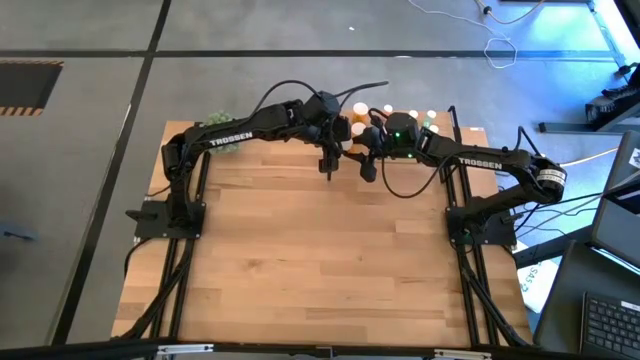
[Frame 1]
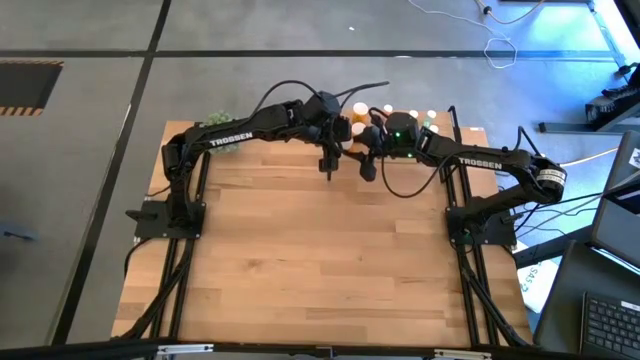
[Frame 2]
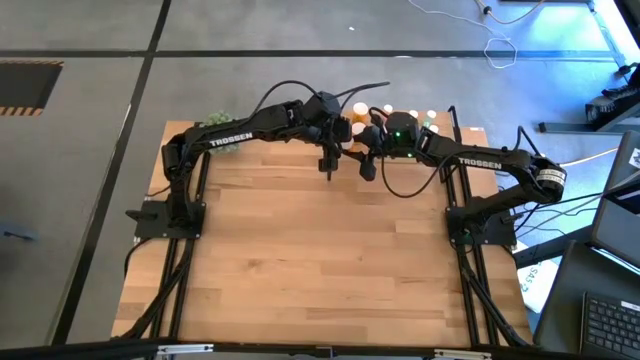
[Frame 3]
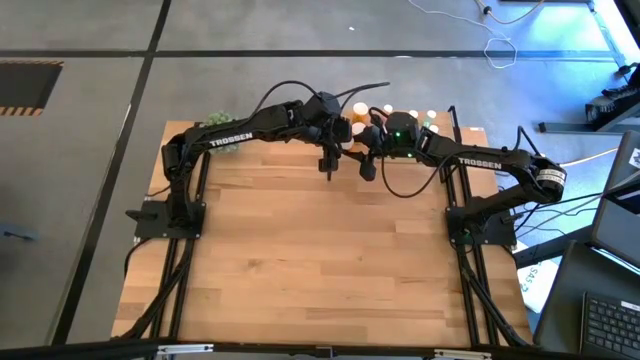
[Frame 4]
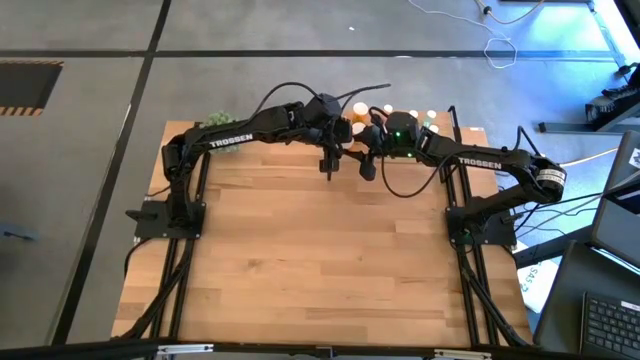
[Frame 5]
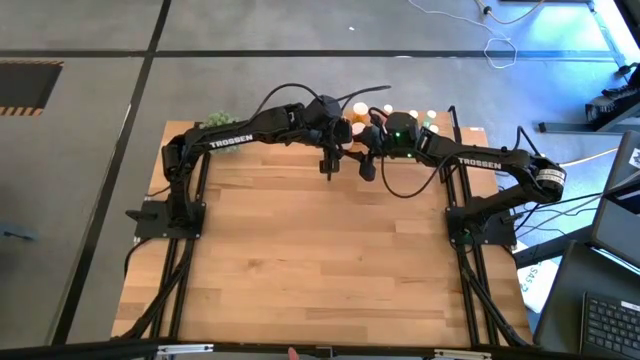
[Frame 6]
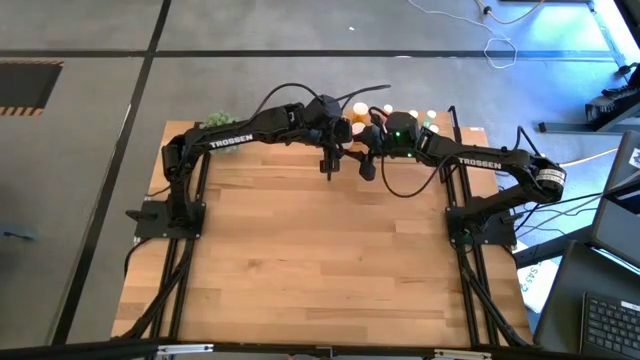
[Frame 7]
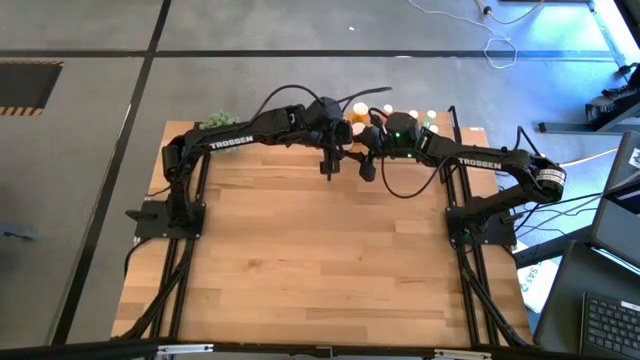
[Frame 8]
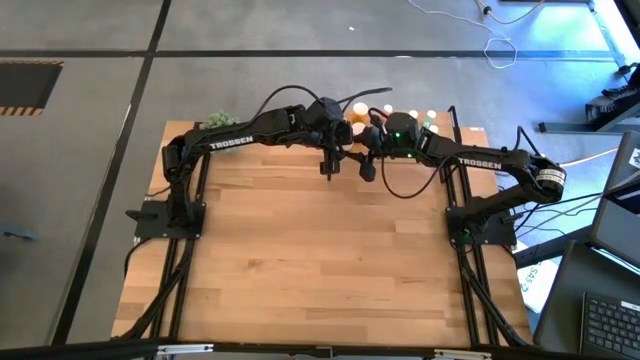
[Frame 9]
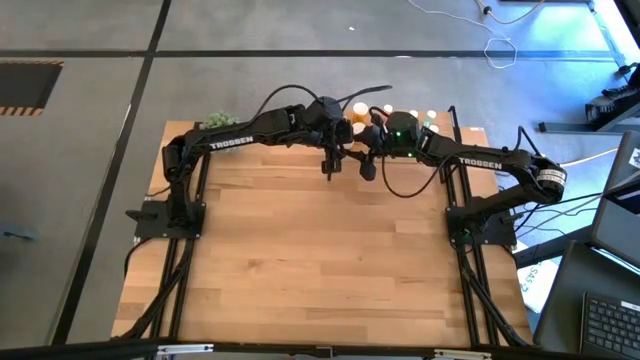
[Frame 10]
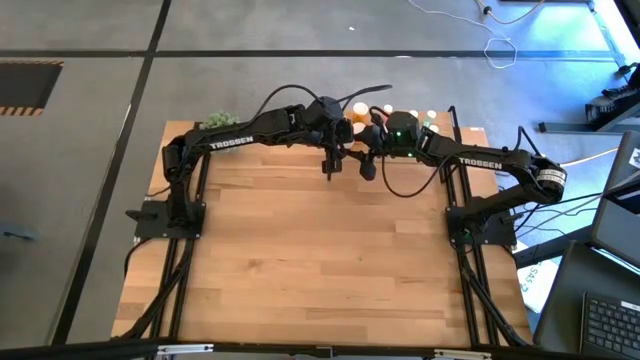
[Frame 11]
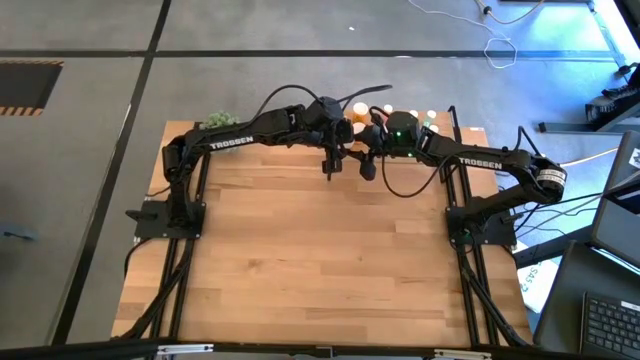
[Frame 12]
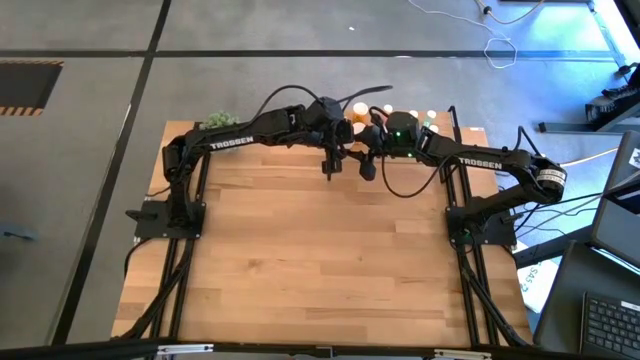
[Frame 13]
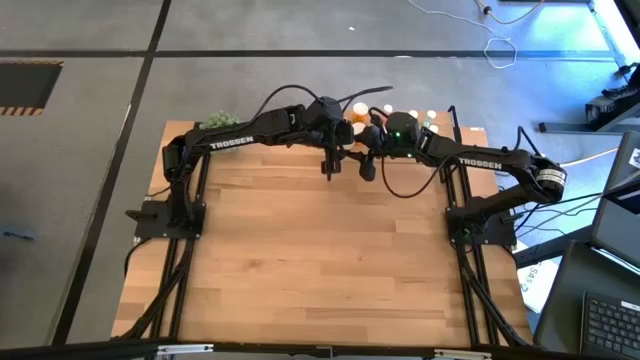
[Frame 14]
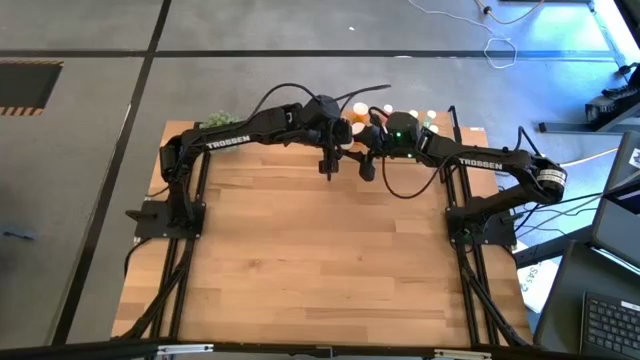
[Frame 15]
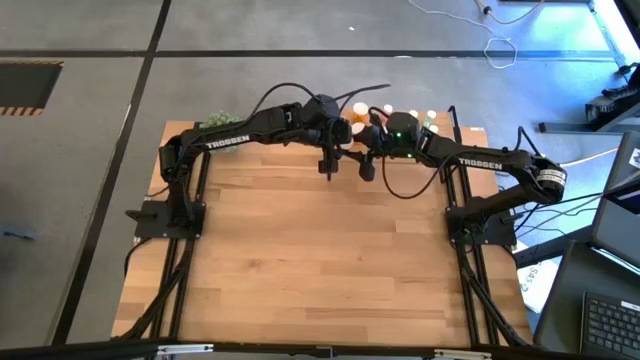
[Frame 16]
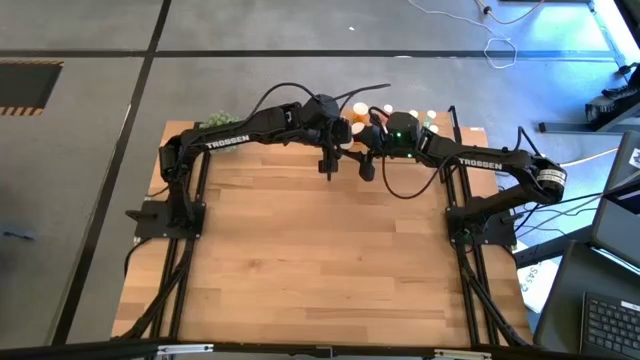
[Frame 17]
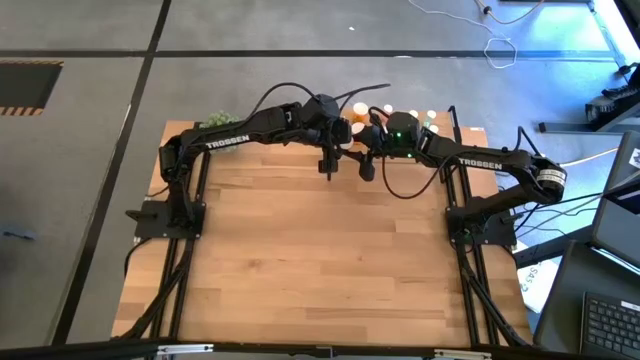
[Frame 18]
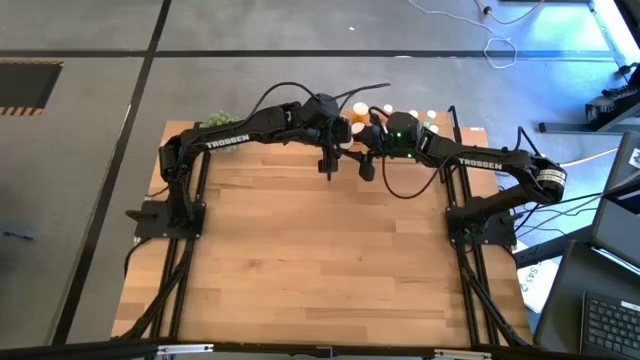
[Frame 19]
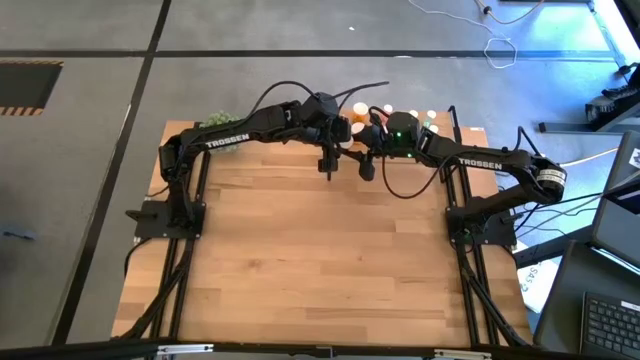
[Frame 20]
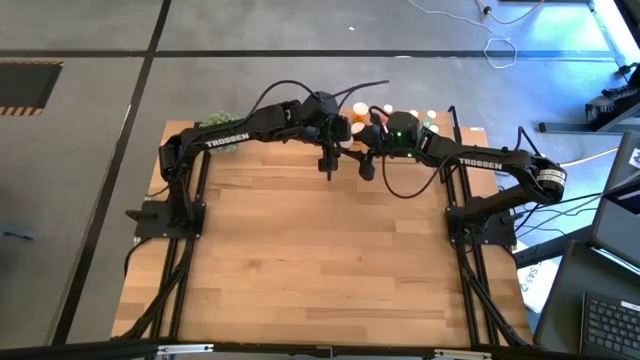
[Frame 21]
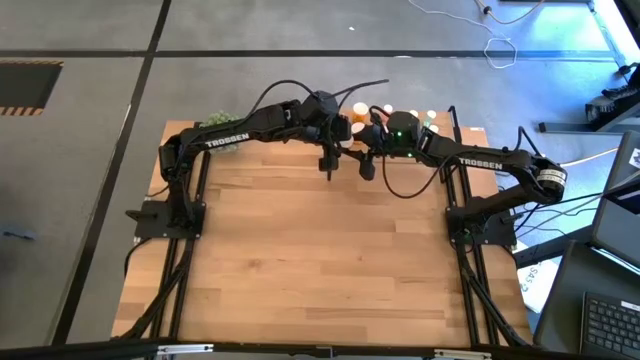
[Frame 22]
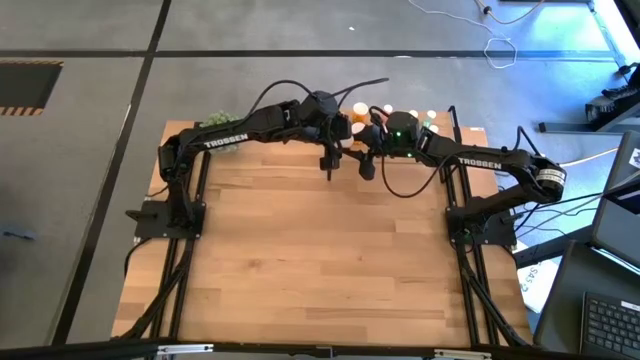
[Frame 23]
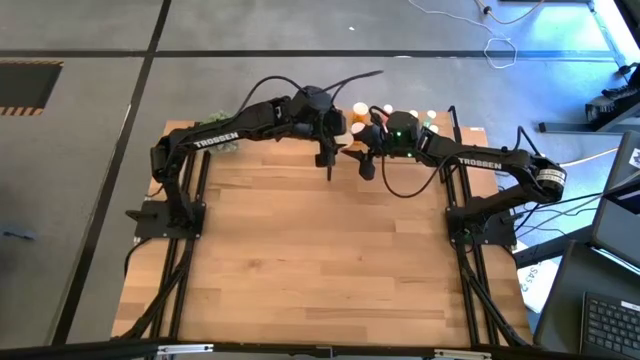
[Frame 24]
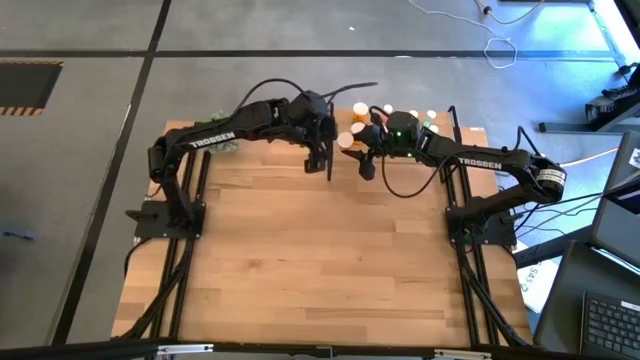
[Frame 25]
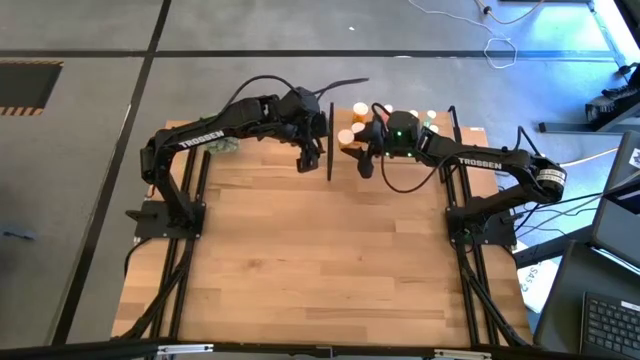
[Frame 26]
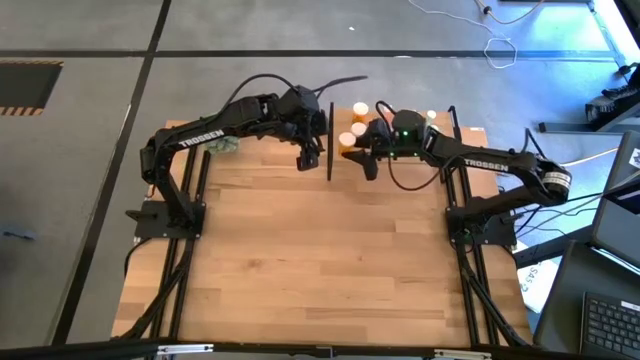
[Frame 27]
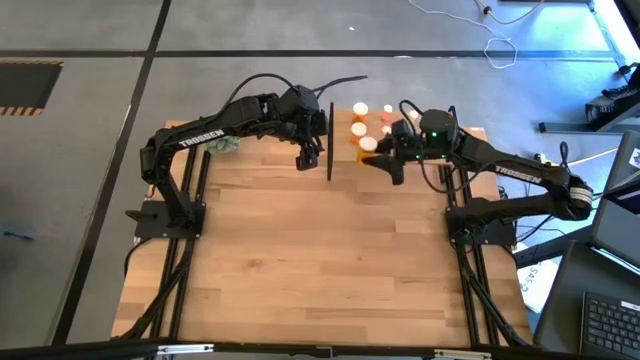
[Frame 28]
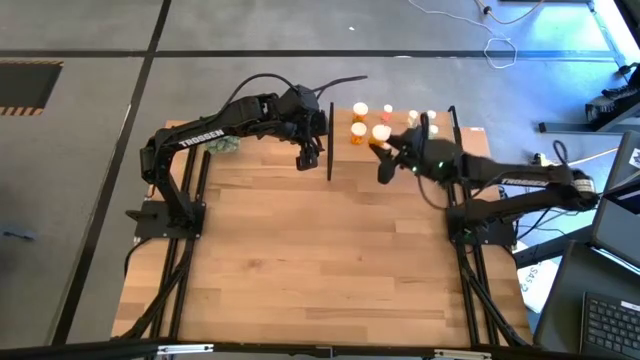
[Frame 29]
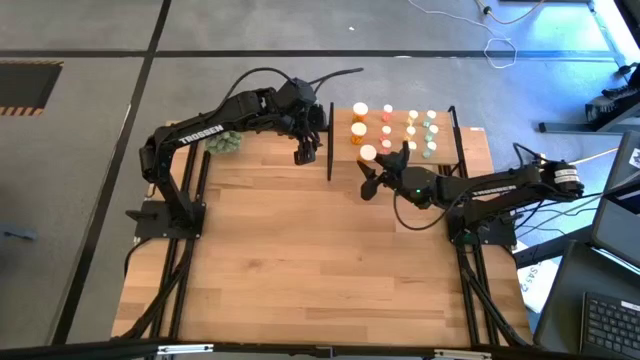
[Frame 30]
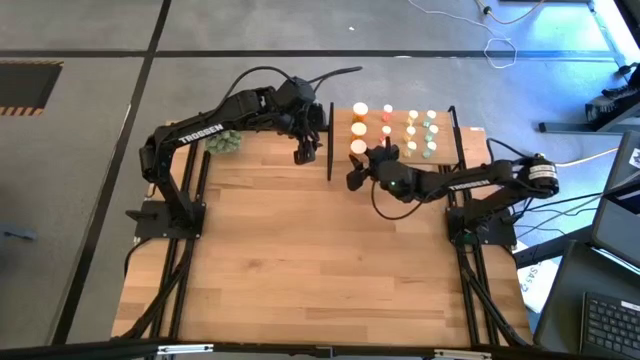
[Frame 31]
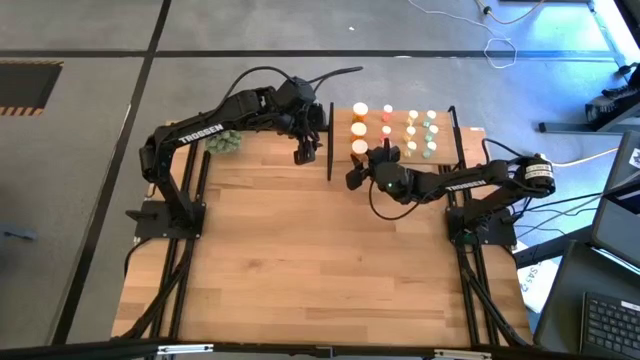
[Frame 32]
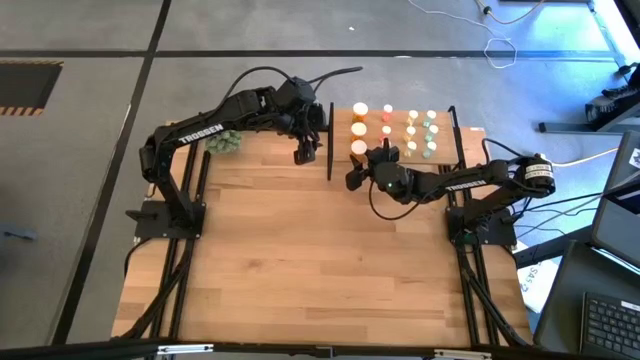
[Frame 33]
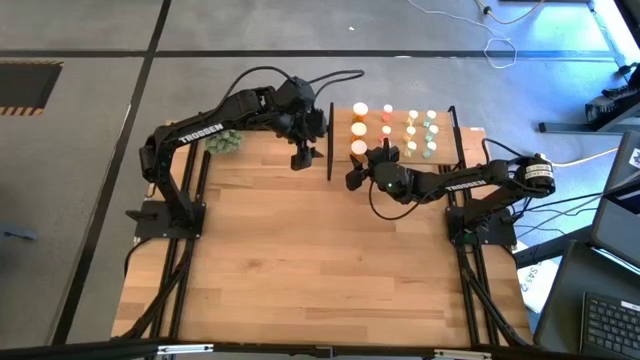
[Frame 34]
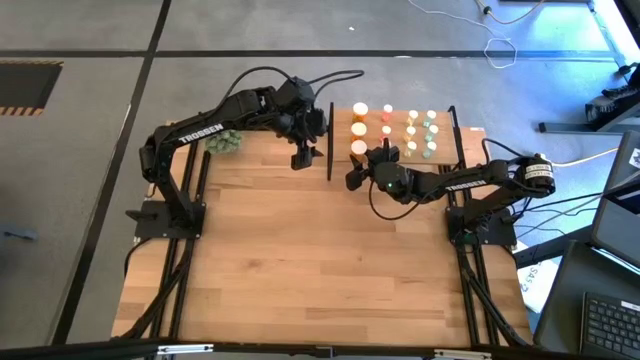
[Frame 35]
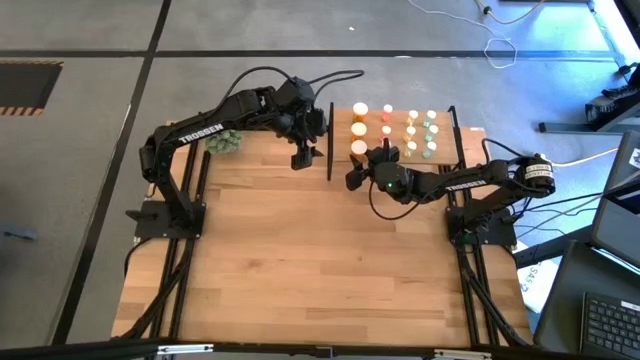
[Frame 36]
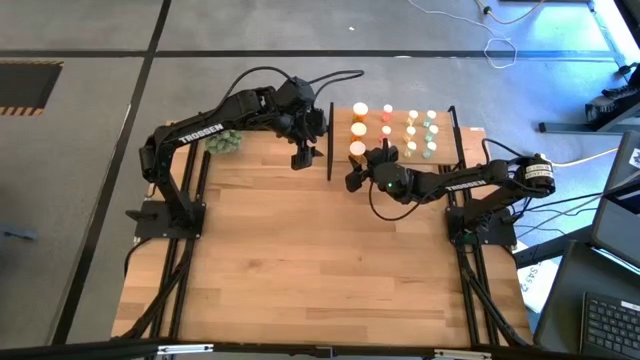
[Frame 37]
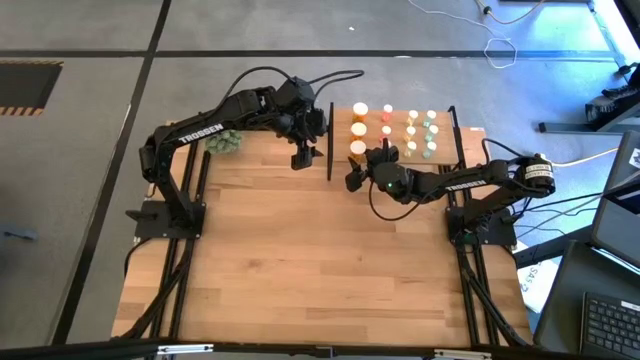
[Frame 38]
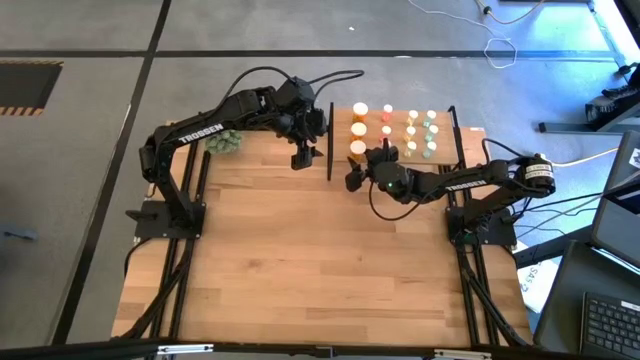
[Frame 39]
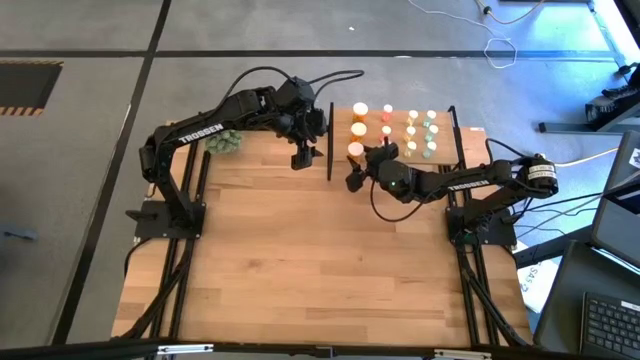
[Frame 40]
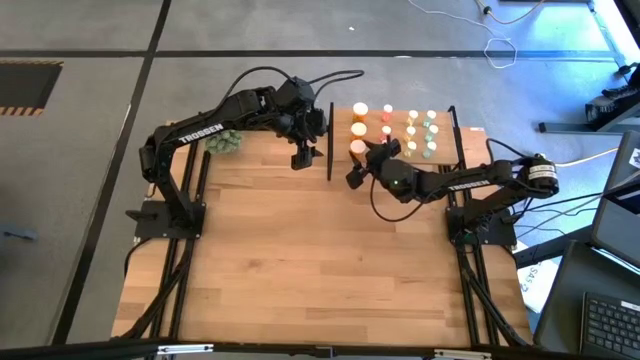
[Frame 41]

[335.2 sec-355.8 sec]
Task: Pick and place medicine bottles onto shelf by color
Put the orange pill bottle on the shelf aligned with the other orange pill bottles

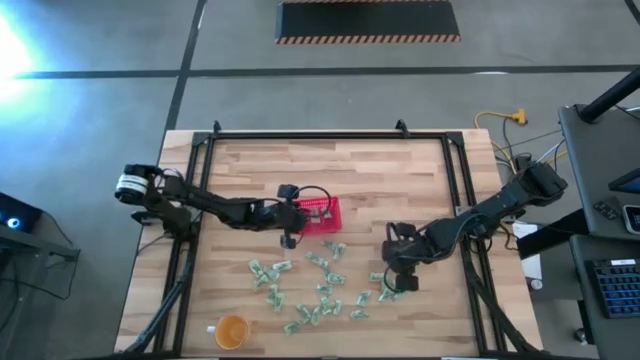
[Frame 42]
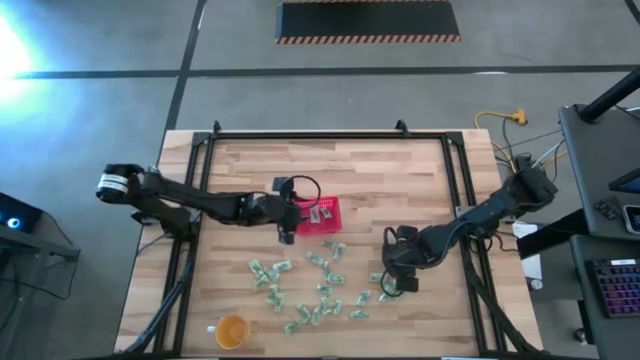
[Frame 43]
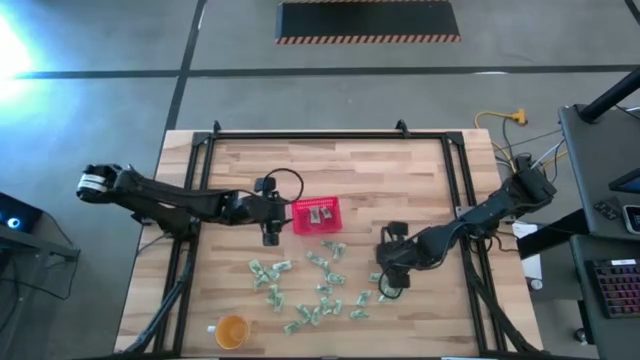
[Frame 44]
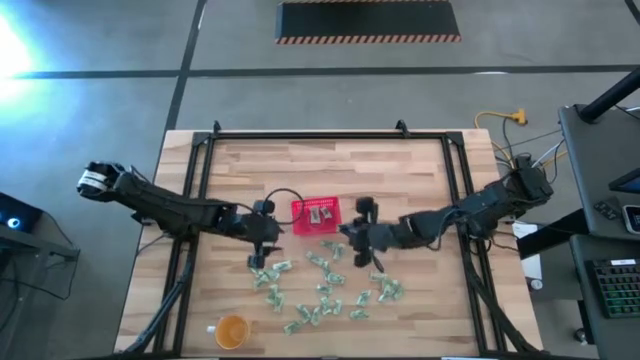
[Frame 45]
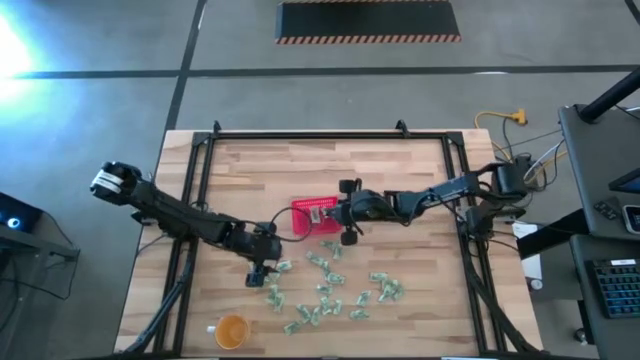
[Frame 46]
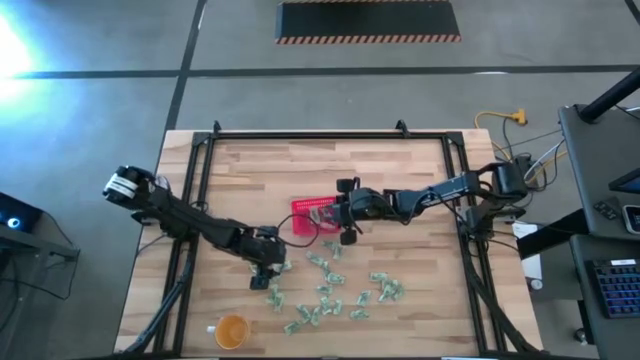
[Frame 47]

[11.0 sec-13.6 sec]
Task: Pick and place items into bin
Put the stevia packet into the red bin
